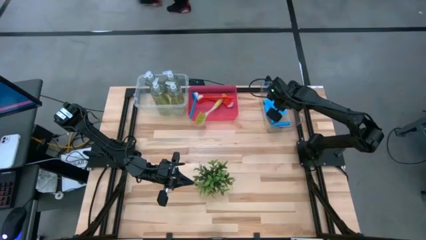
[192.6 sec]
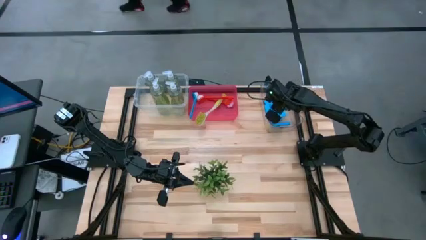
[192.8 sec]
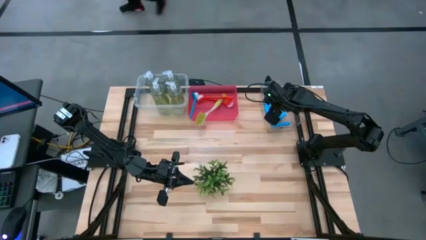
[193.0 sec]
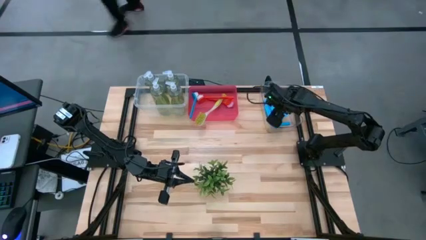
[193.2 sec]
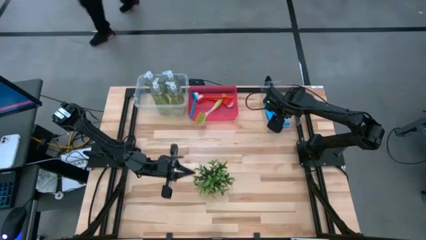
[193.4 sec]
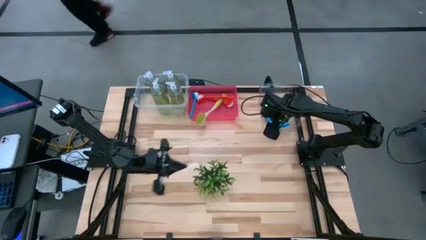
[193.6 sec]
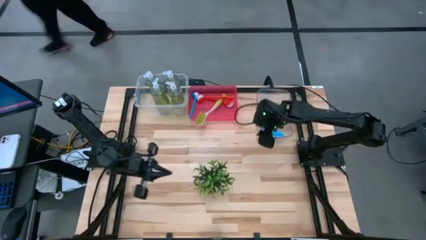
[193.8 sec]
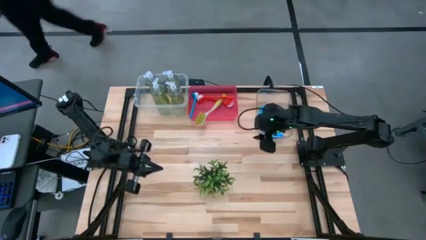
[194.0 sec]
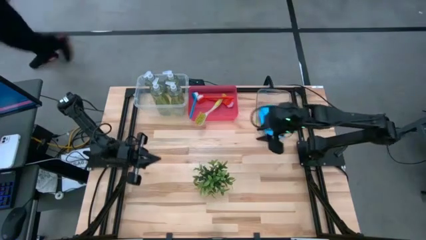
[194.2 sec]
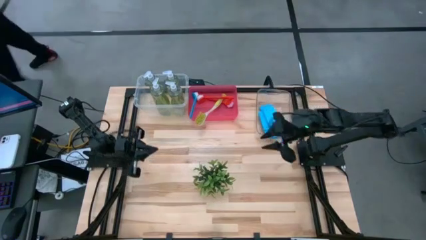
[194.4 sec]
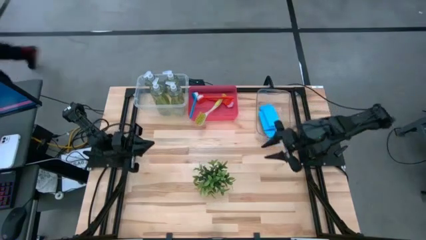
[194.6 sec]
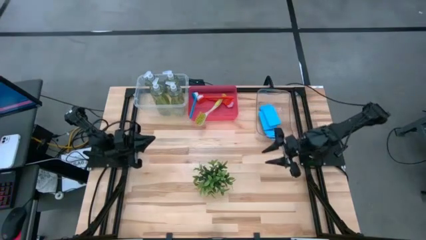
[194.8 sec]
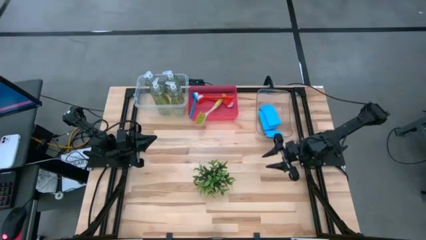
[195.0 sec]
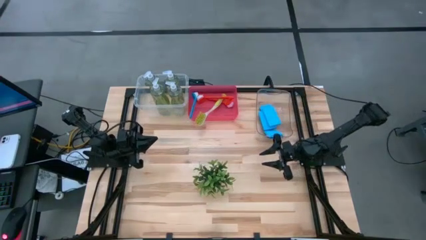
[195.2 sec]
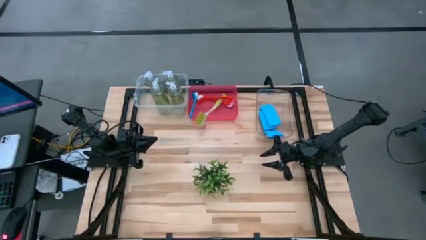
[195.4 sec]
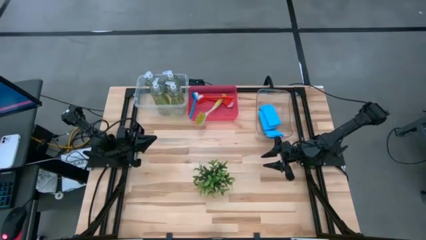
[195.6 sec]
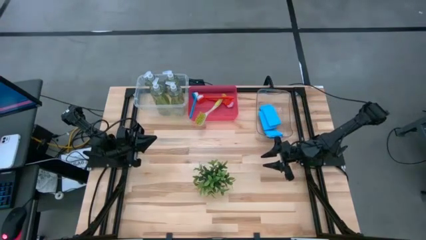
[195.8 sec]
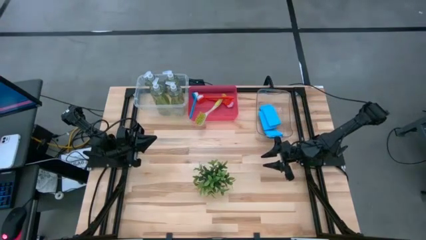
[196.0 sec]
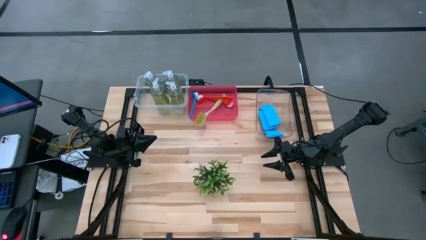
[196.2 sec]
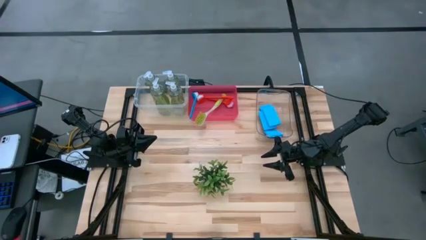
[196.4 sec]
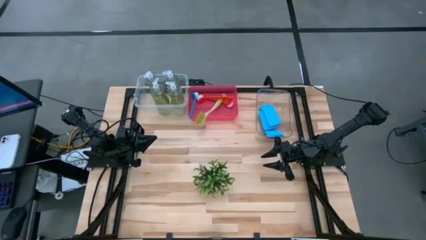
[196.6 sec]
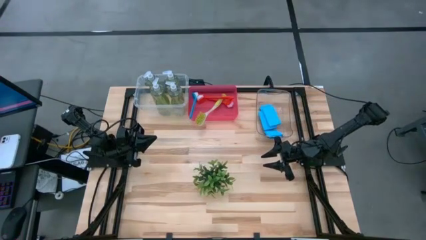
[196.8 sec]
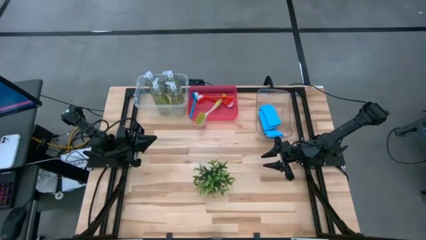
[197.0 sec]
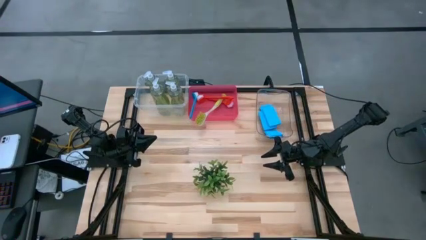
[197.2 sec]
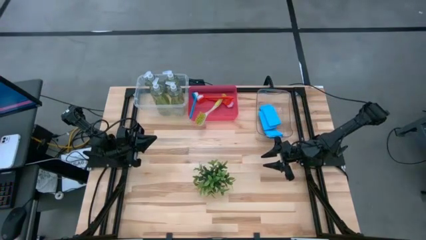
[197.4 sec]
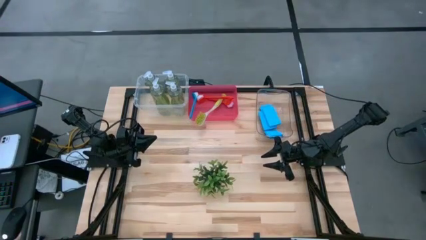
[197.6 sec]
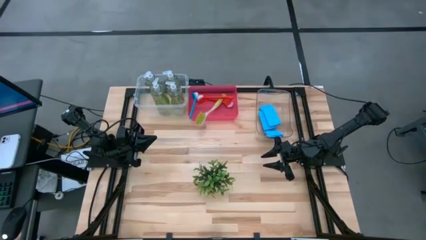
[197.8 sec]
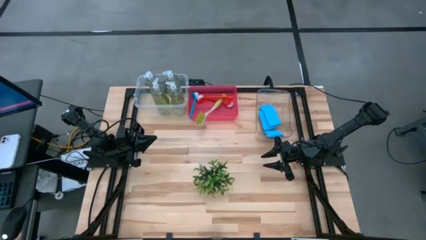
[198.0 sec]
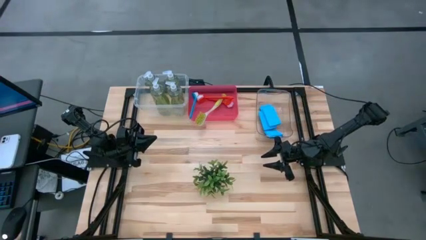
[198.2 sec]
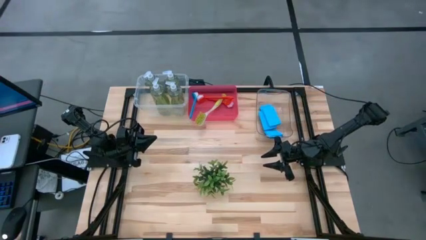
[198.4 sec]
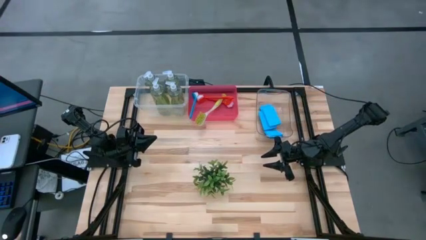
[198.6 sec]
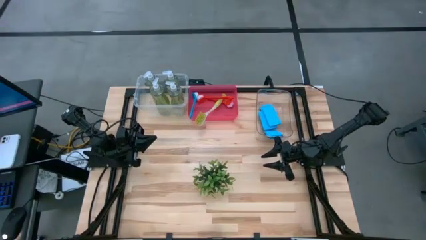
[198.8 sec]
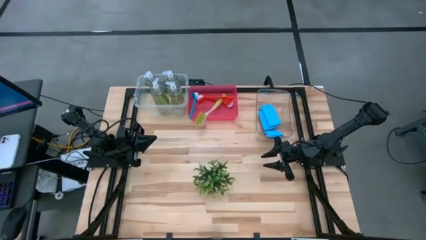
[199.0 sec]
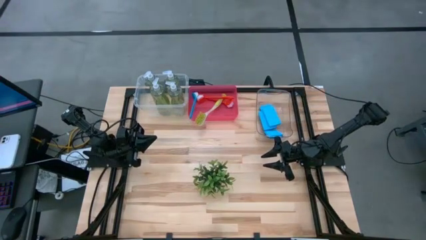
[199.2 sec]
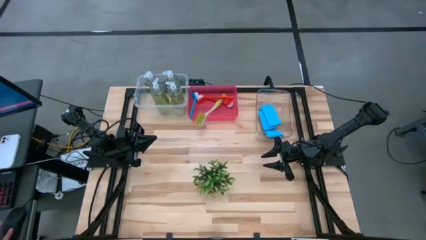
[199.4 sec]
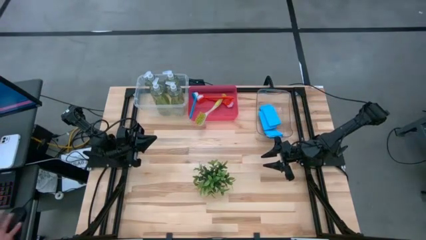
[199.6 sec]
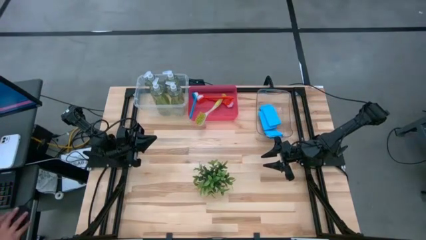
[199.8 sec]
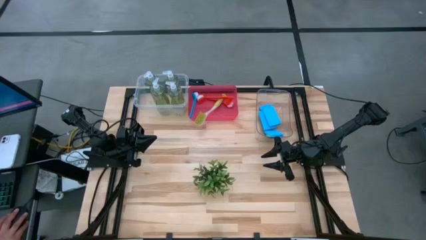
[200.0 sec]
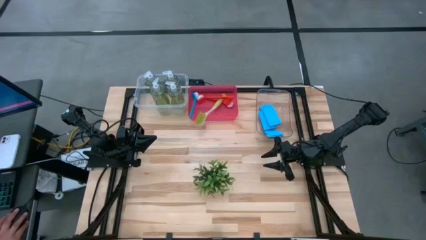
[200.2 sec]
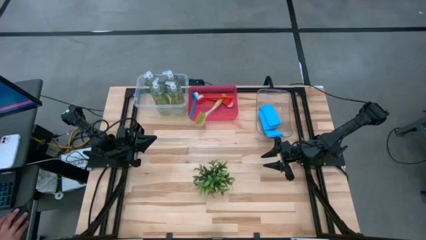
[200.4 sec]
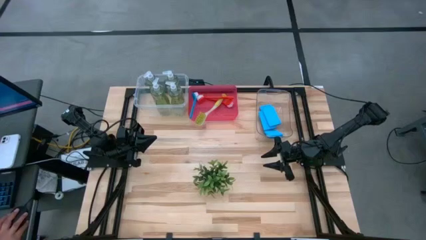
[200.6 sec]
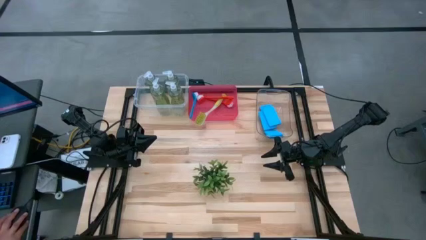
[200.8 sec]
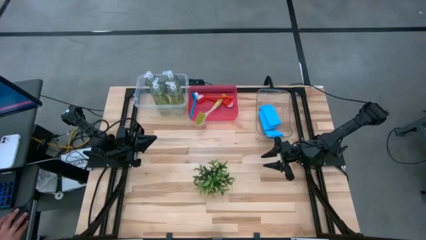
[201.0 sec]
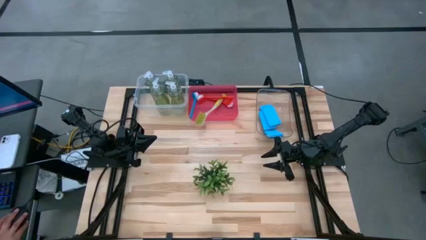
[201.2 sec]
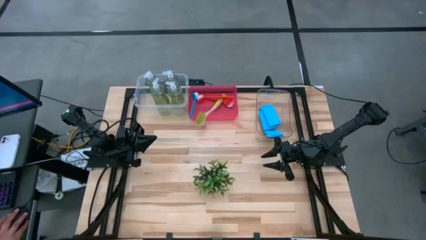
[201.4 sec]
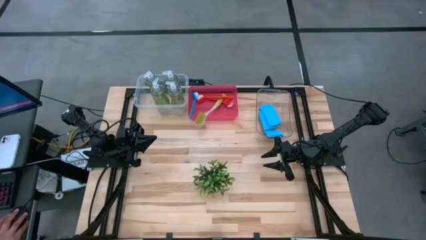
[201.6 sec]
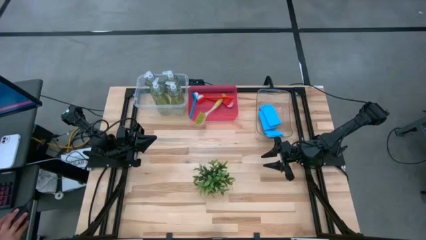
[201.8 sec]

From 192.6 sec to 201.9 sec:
Task: Pick & Place Kitchen Sink Supplies
Return to Home Position

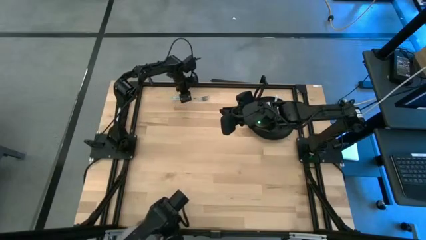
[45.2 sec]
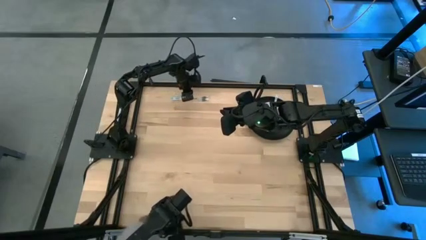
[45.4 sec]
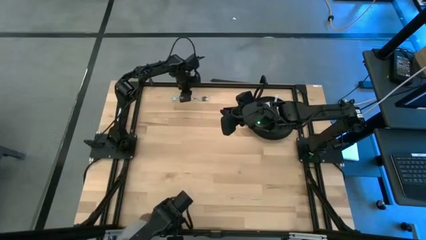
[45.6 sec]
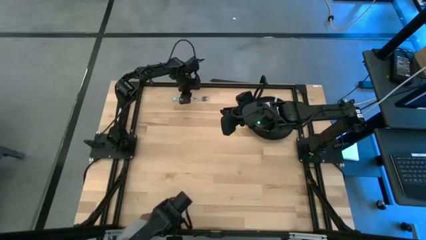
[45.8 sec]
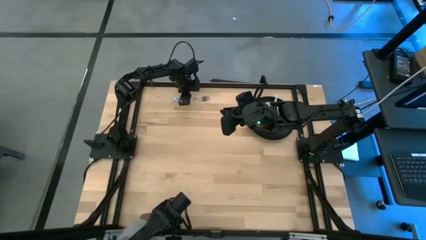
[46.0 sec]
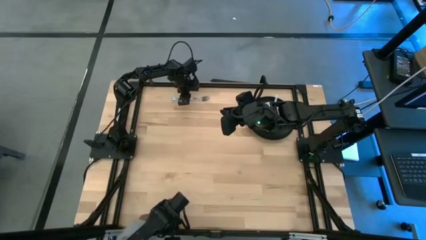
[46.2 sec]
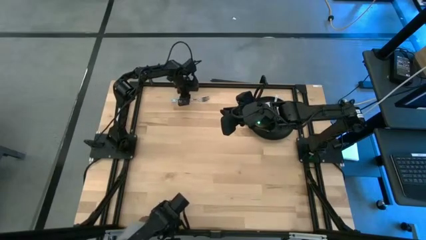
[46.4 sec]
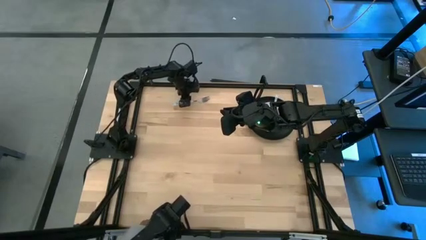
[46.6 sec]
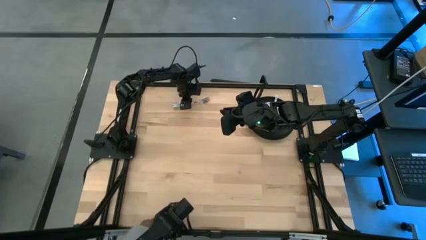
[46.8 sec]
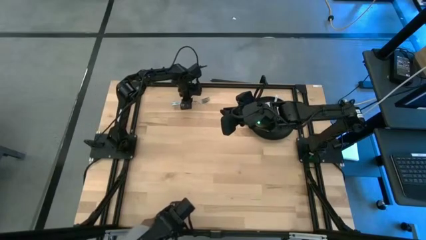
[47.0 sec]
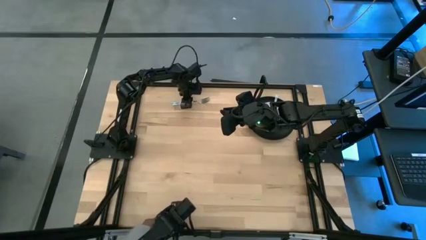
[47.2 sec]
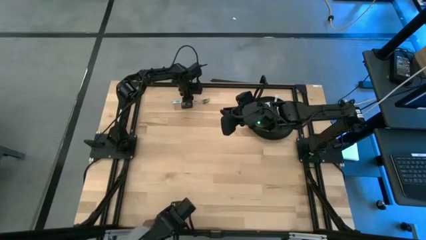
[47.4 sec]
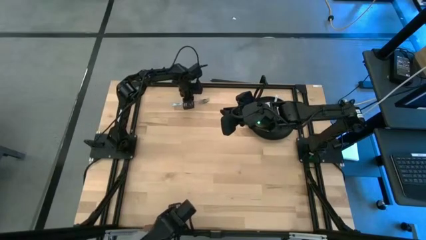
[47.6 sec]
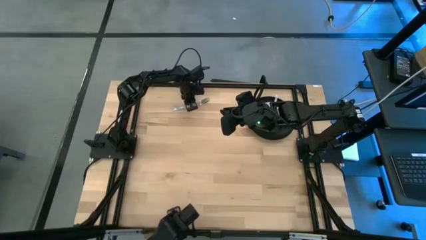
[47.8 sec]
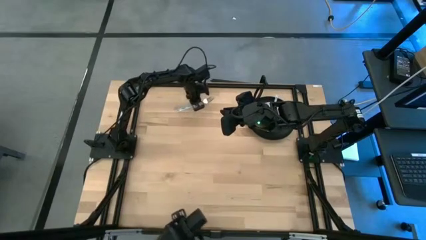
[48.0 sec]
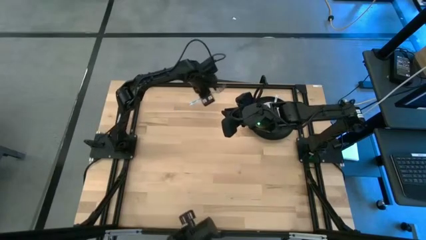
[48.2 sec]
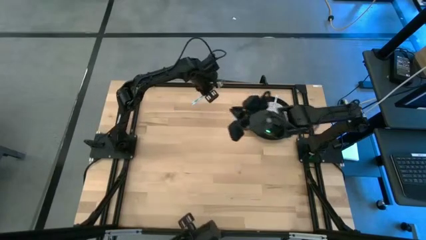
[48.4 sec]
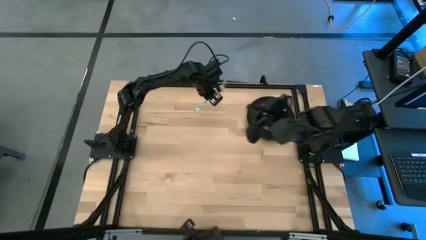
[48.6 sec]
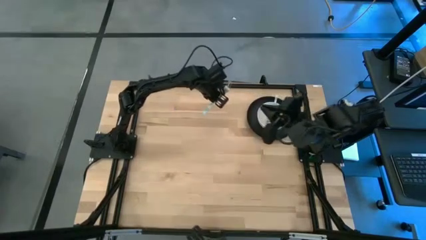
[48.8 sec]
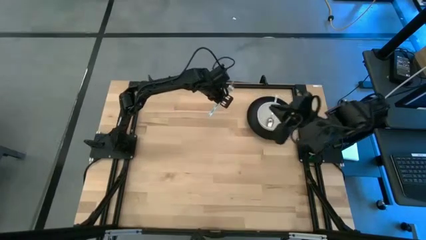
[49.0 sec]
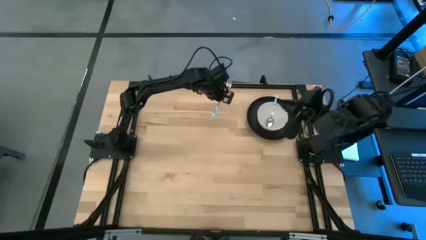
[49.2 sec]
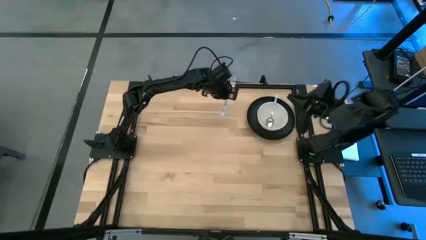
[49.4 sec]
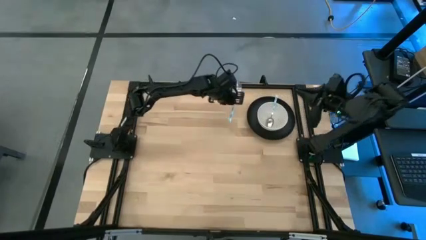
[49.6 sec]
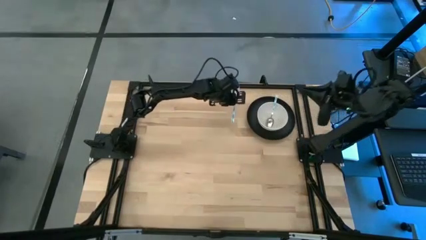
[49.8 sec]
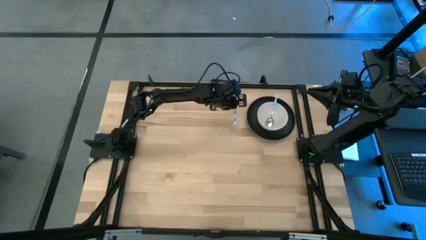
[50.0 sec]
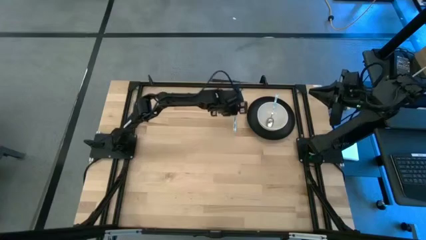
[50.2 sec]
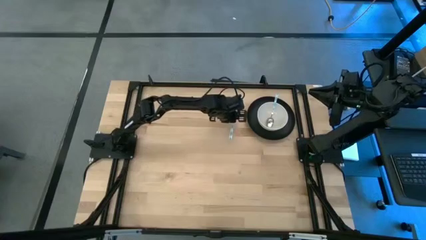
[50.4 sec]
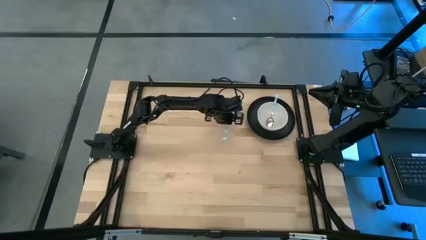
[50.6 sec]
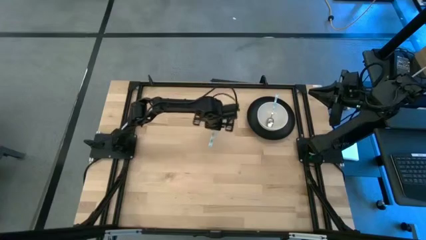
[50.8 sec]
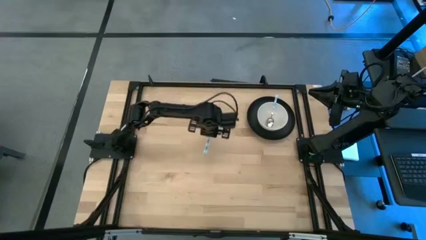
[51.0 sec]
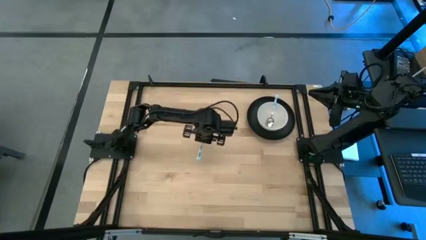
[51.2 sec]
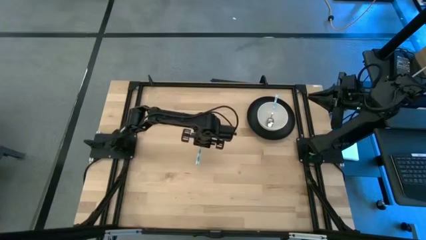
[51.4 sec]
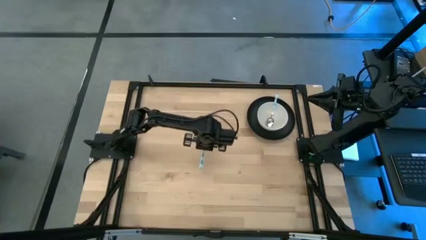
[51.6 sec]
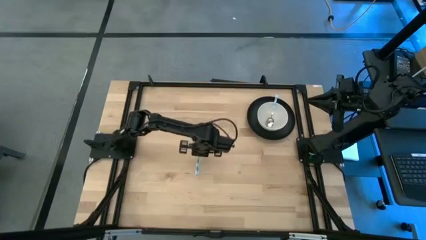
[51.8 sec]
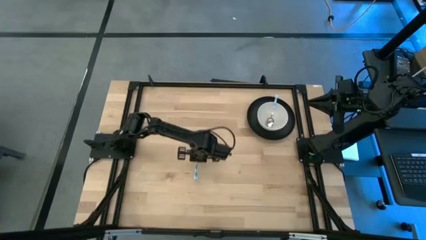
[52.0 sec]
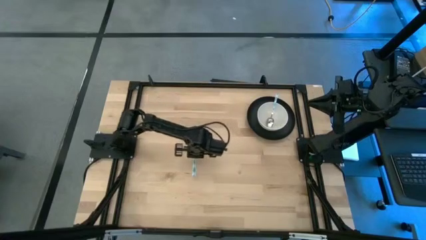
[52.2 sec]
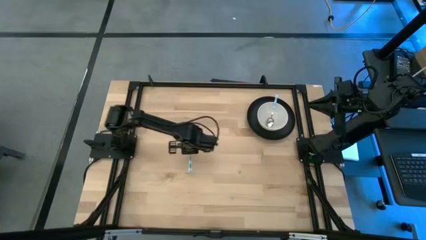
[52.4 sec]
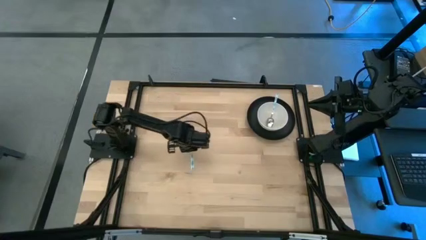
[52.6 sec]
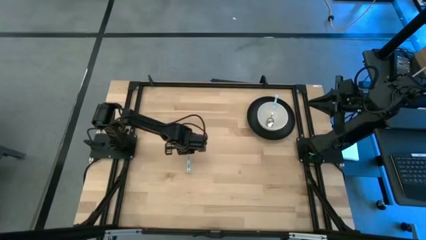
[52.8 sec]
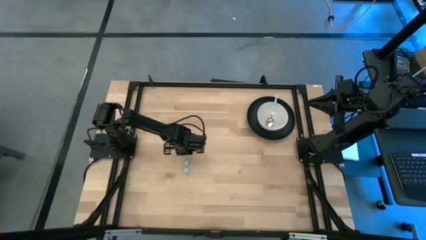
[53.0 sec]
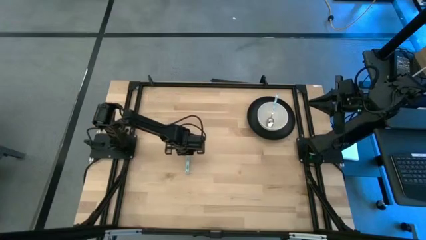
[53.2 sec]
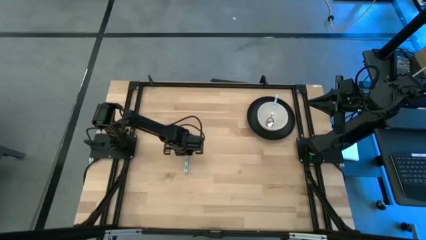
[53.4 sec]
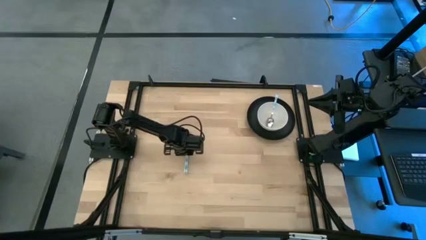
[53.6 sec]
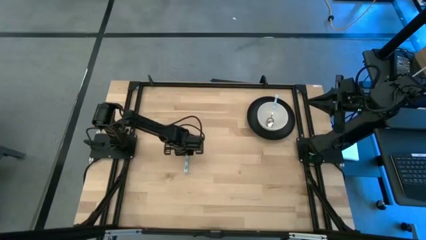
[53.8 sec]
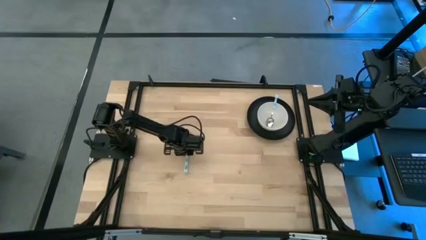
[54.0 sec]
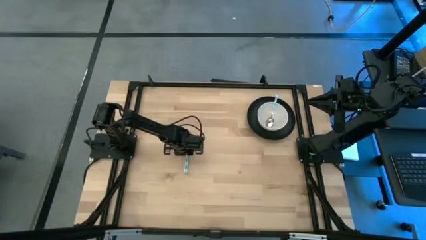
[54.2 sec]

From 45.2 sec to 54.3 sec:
Task: Set table place
Put the fork on the middle left side of the table
